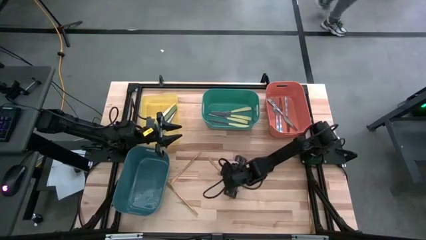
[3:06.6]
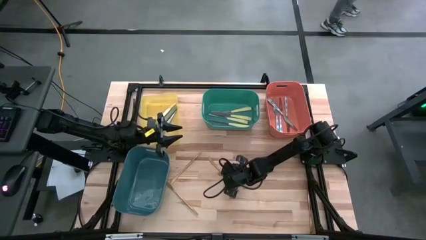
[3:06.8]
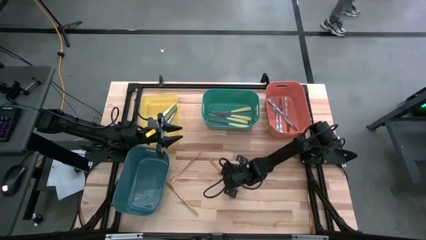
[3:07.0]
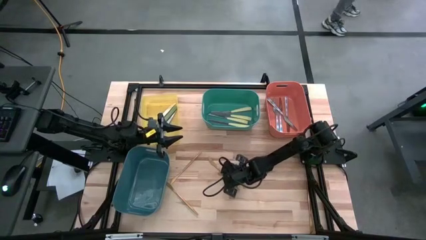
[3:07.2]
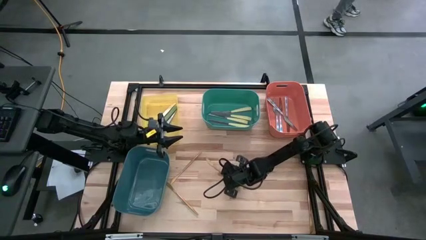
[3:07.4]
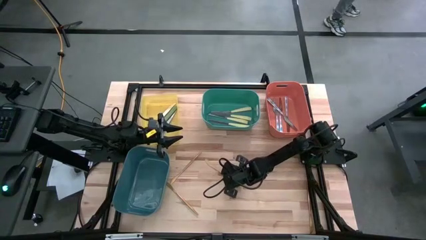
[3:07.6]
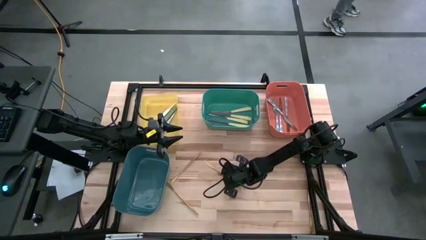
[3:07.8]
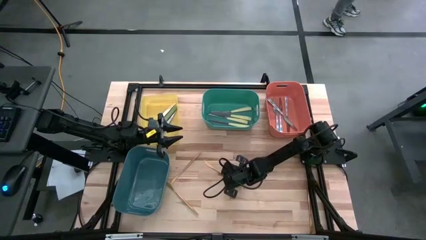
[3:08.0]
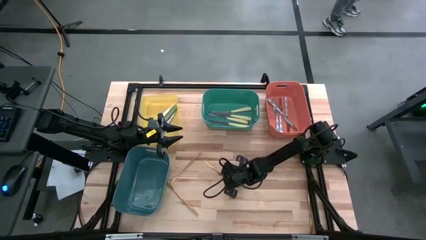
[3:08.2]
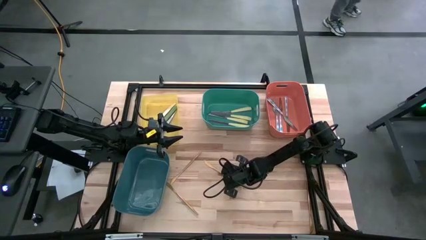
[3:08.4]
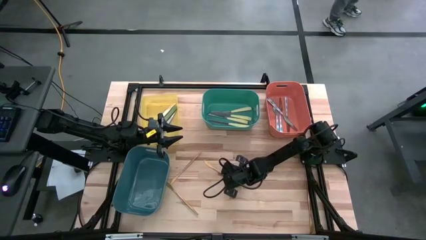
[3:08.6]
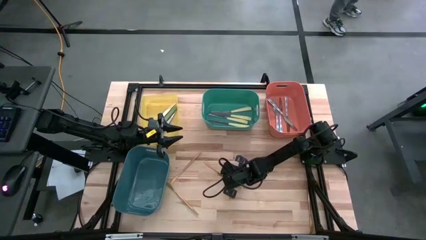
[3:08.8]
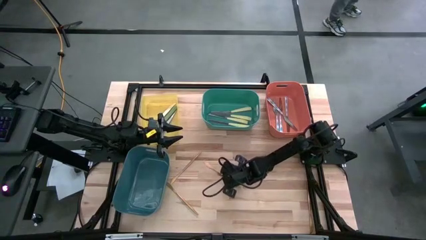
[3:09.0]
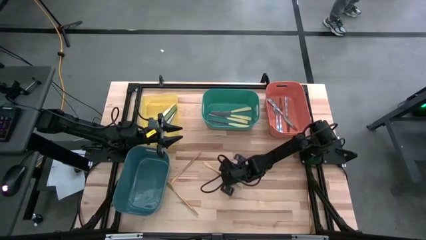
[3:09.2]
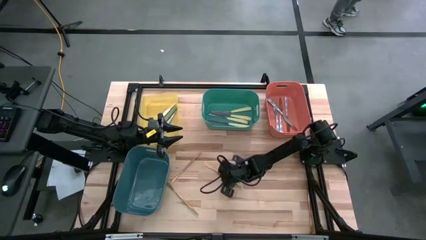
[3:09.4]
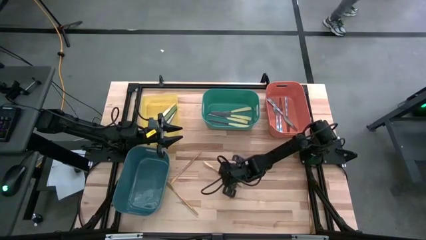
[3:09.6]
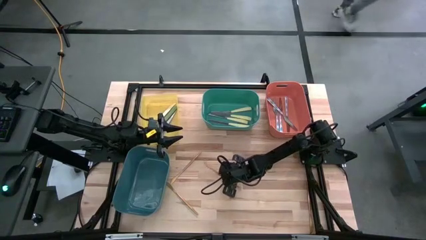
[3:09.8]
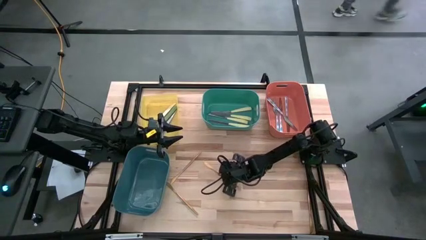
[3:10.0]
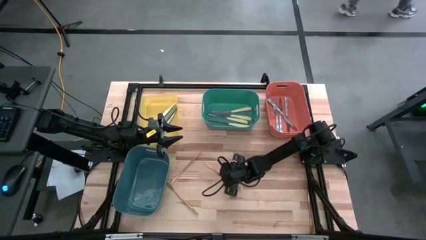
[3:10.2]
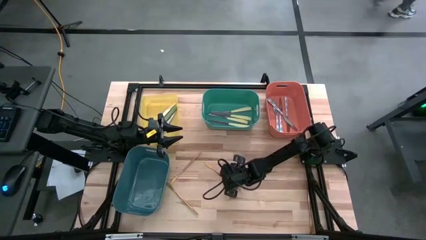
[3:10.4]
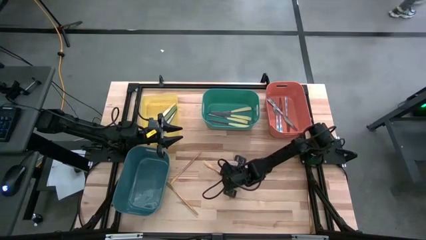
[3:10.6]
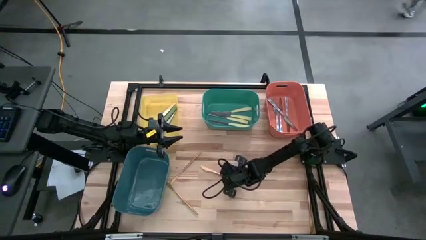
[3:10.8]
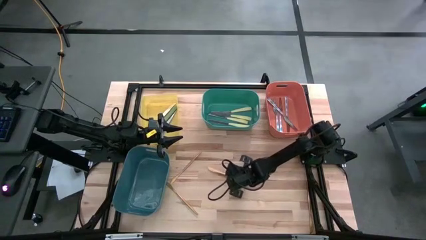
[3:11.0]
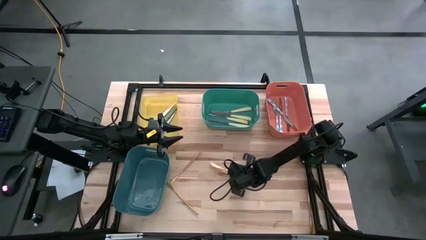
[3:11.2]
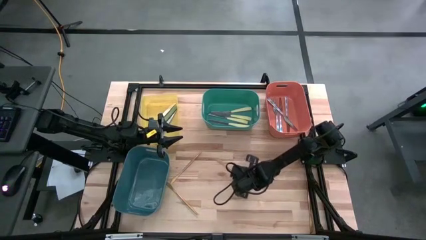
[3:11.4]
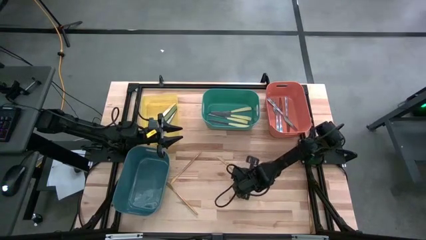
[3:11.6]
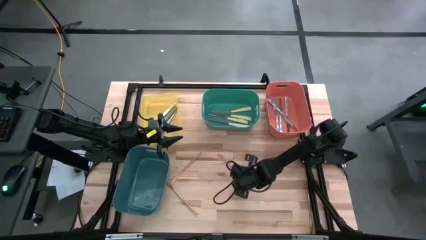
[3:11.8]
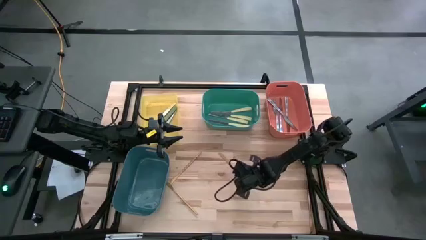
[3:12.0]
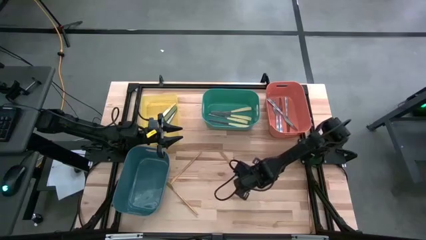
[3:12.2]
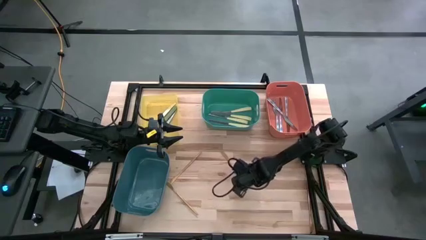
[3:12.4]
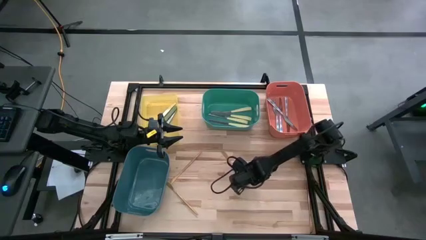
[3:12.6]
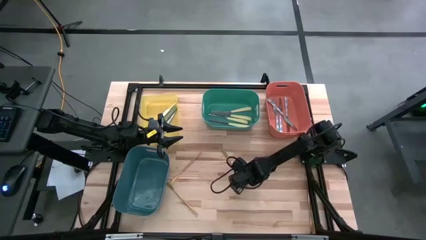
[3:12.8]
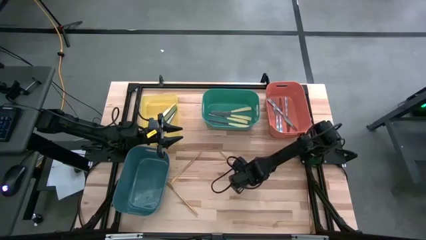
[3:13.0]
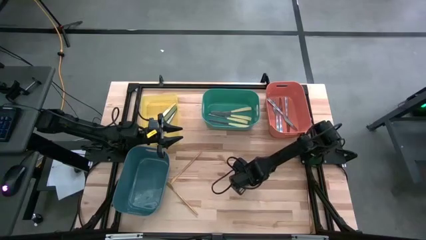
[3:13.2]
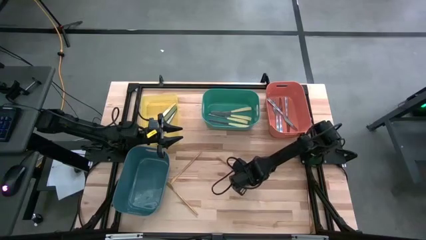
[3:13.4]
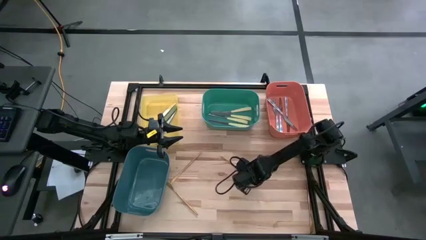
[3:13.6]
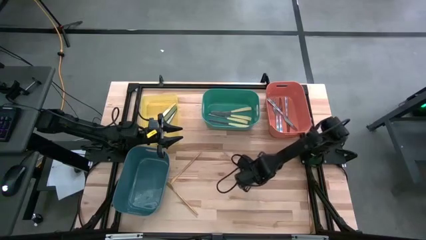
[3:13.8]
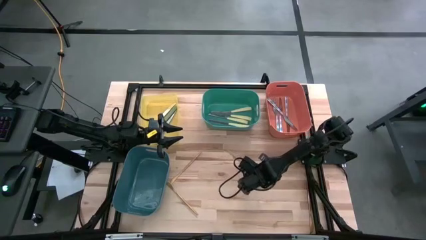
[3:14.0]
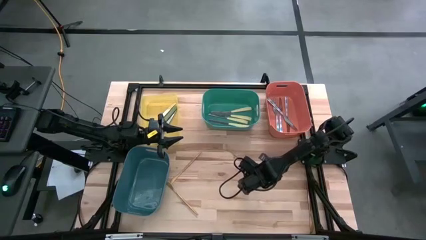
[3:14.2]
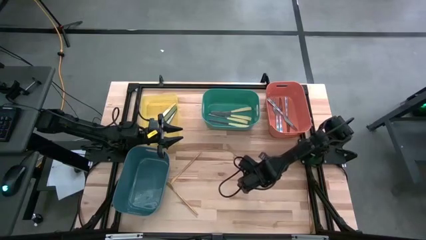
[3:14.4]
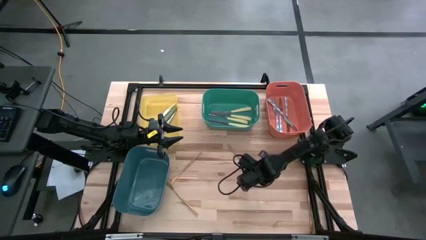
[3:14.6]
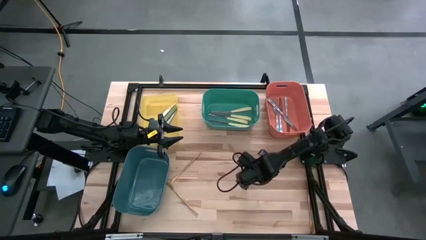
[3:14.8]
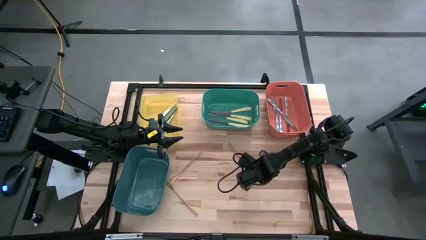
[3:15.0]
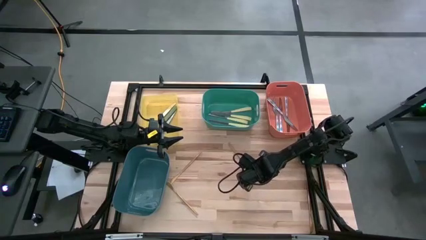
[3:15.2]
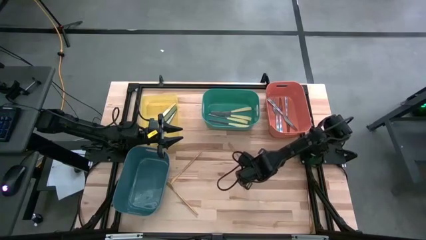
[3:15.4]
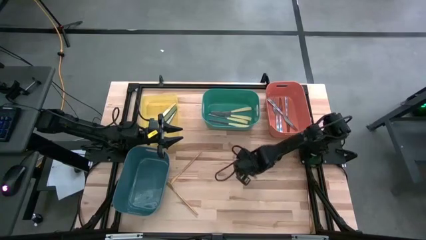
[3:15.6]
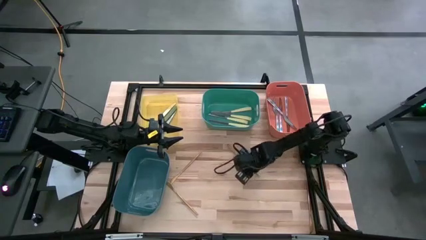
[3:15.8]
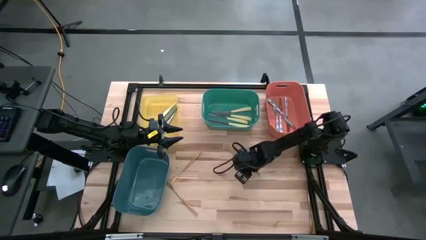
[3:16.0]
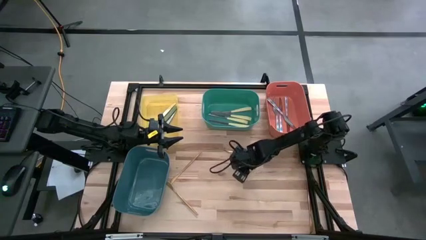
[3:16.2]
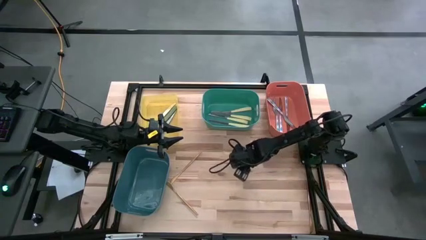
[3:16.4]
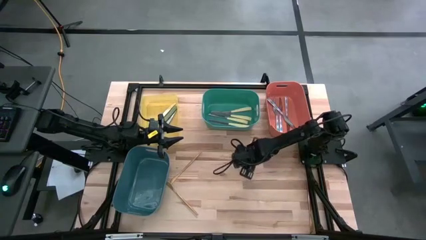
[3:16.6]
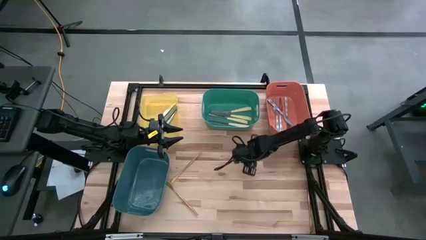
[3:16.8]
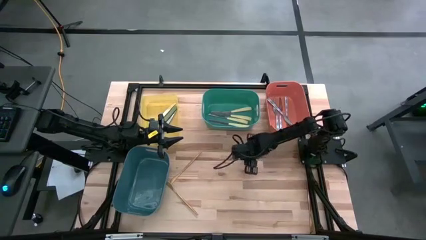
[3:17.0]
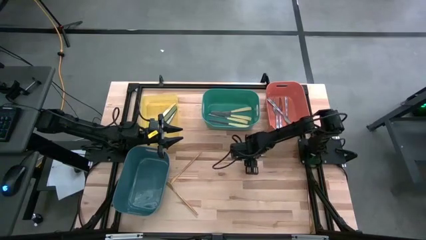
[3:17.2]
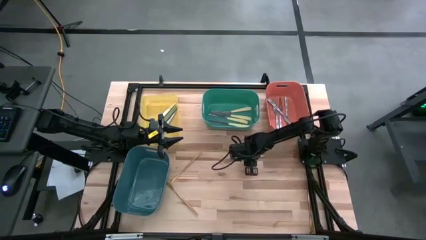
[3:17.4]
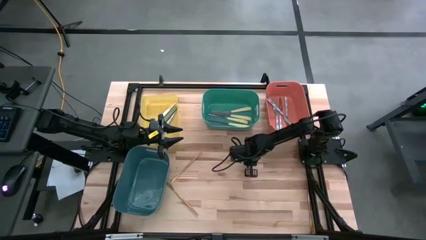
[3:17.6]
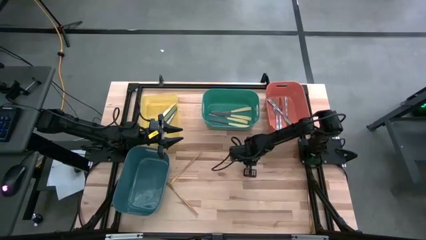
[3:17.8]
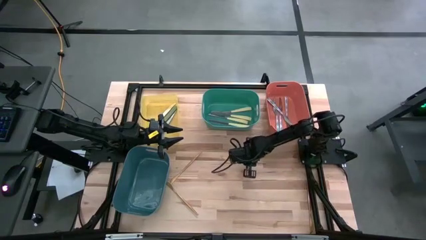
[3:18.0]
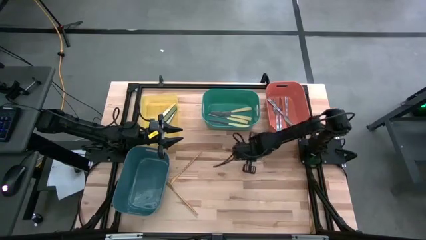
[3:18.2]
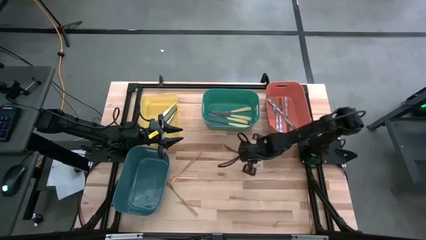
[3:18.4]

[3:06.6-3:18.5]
Task: Sort silverware by color (type)
Put the gold knife into the blue bin
